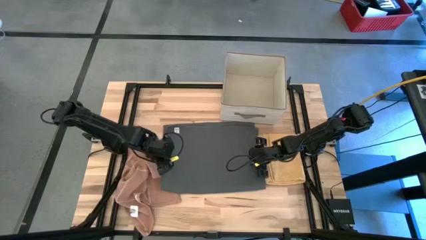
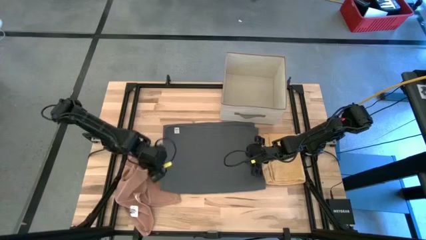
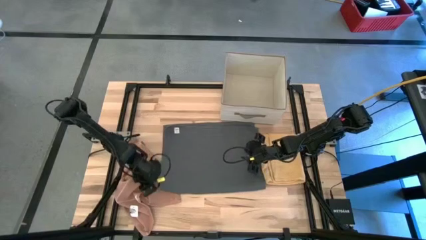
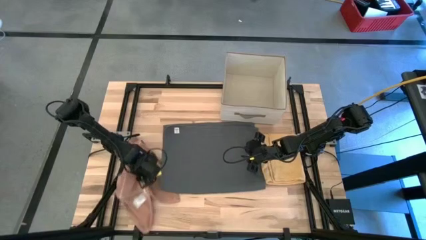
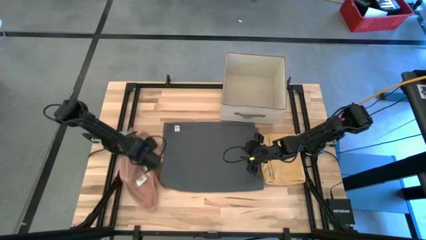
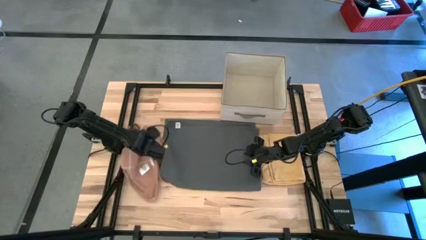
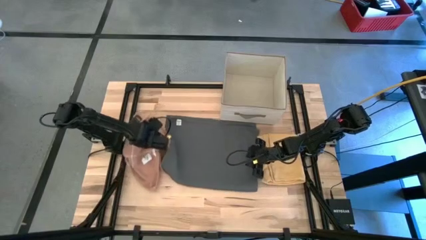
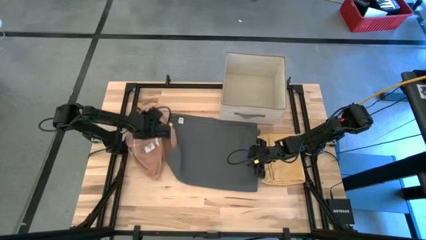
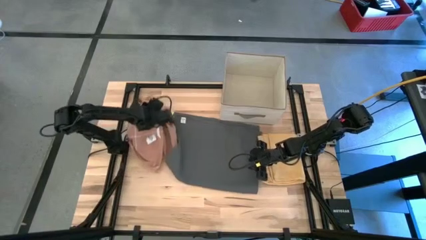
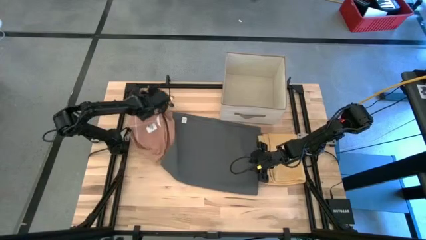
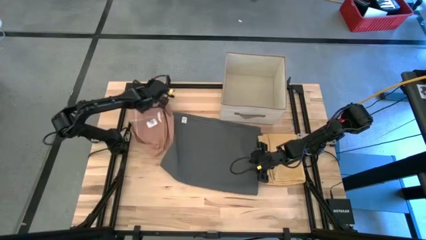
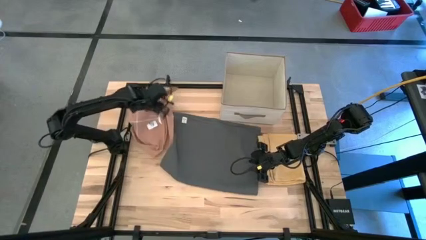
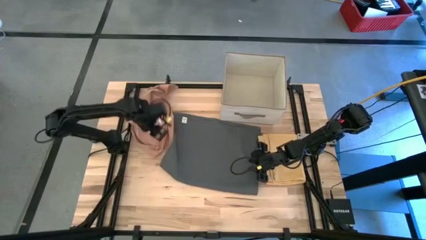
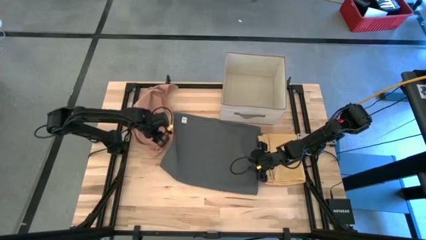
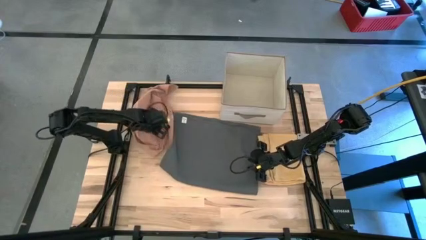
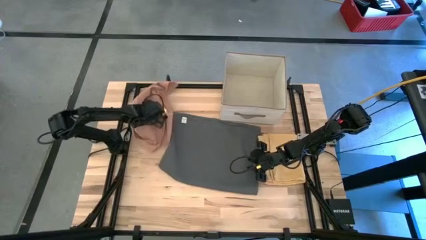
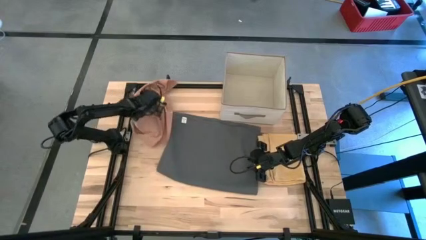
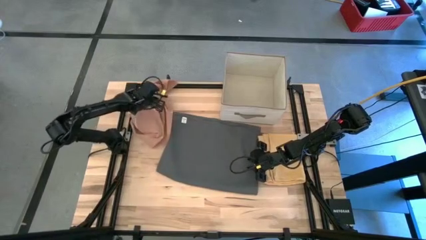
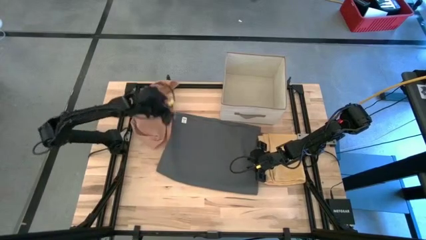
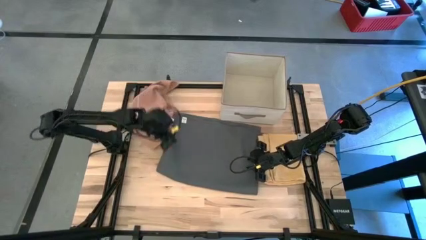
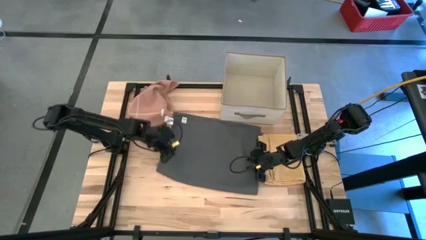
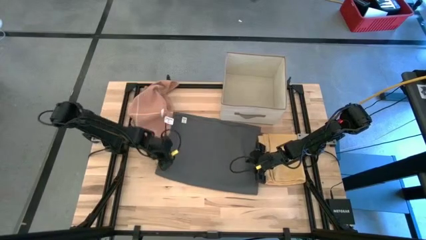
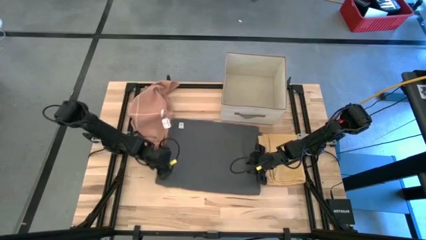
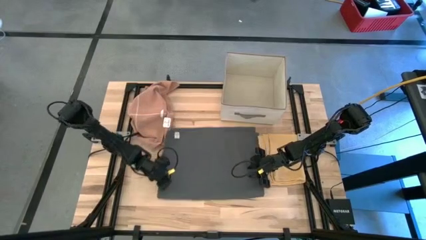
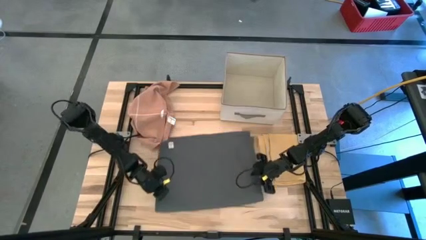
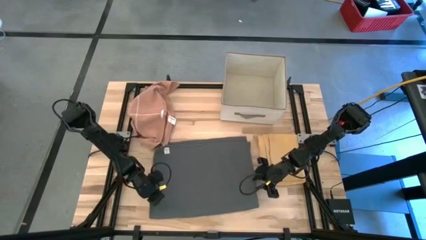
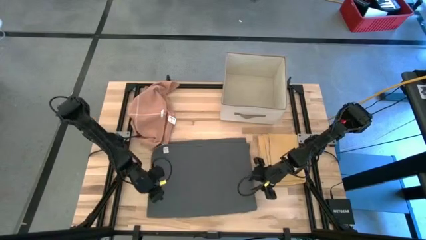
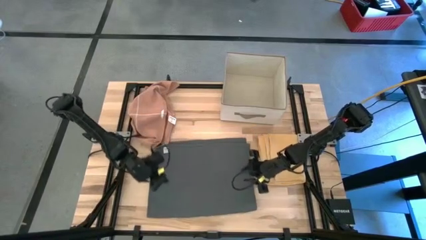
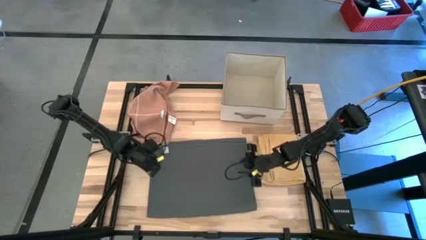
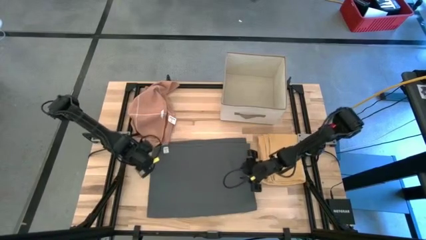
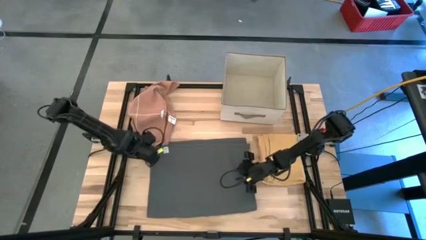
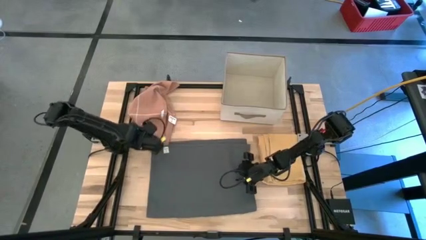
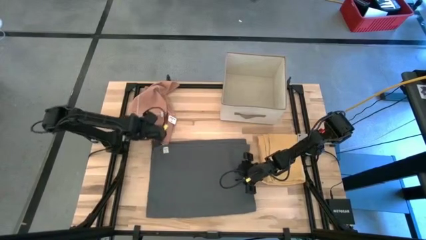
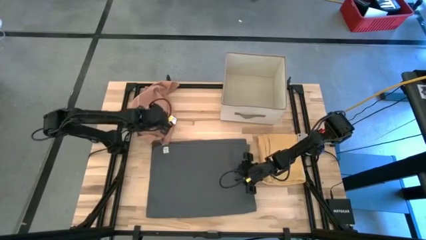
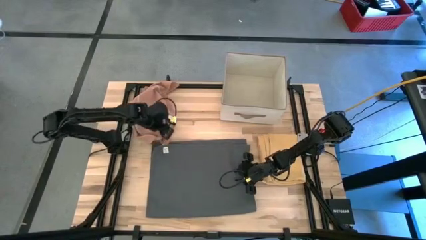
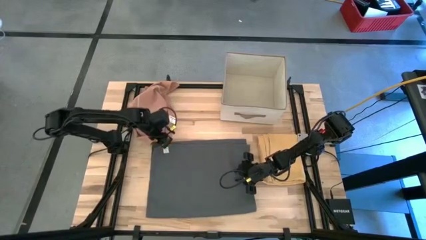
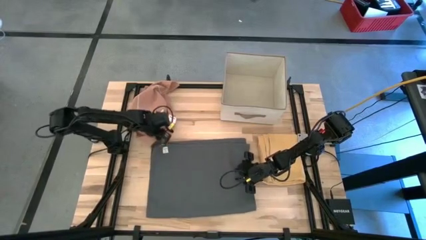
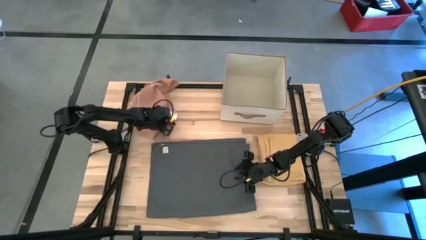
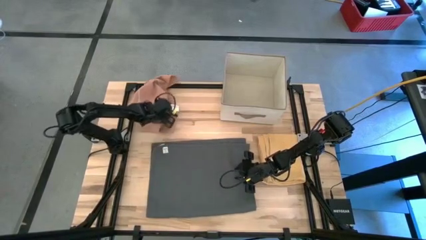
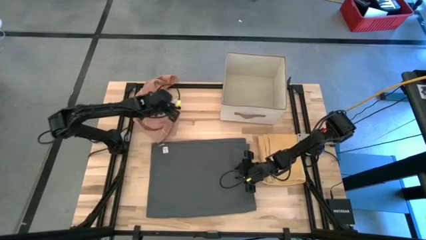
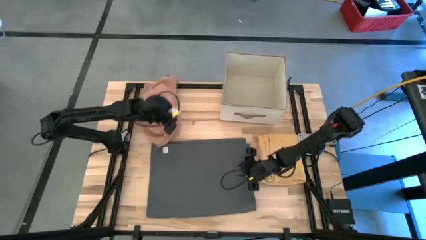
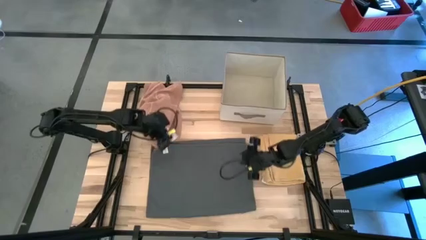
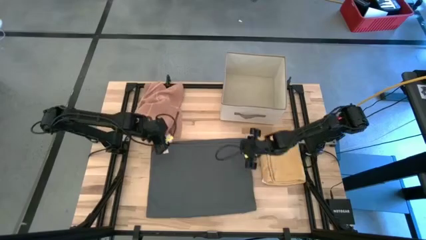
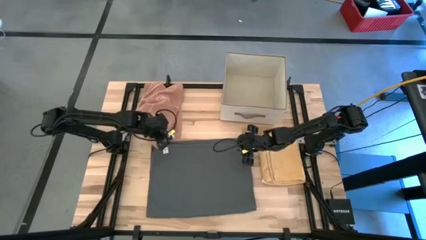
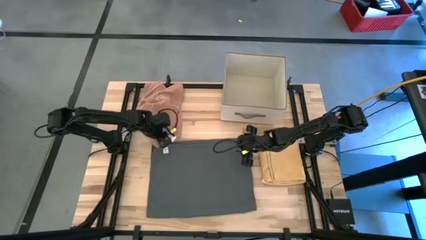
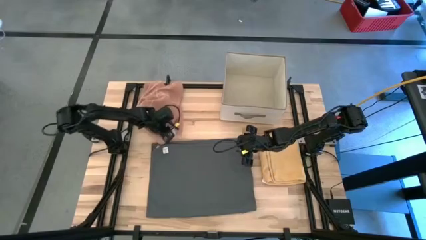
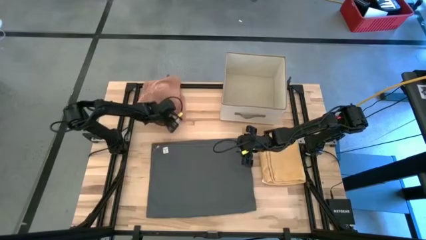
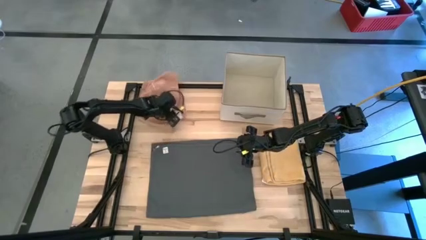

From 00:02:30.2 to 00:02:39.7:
Task: Fold towel
Move the brown towel to the top left of the table

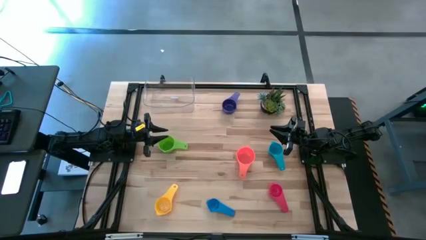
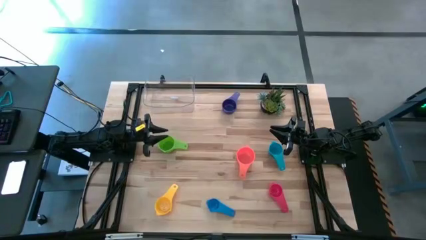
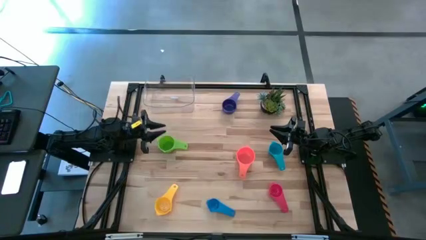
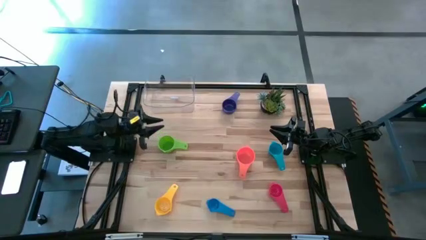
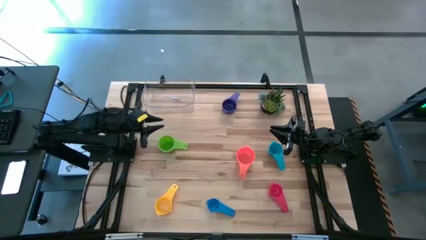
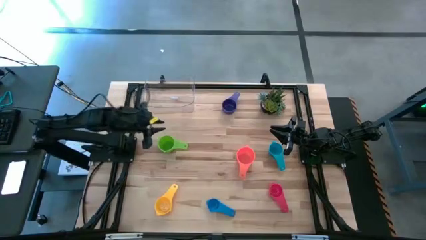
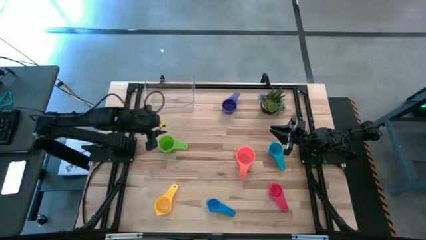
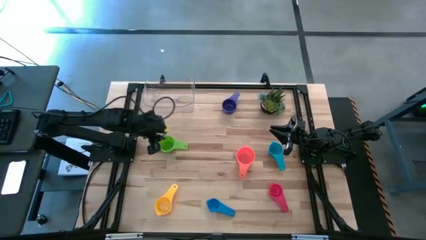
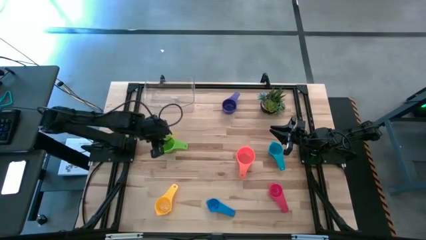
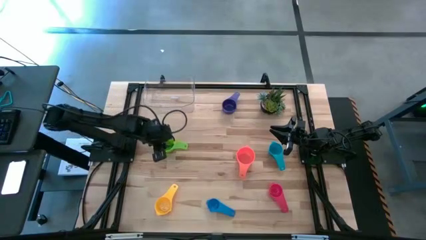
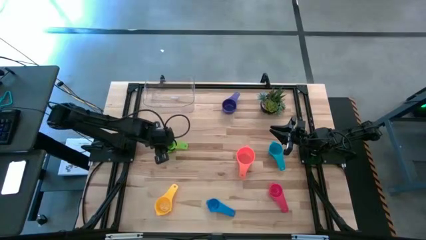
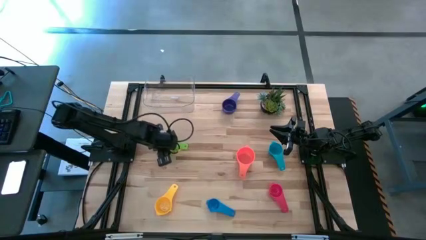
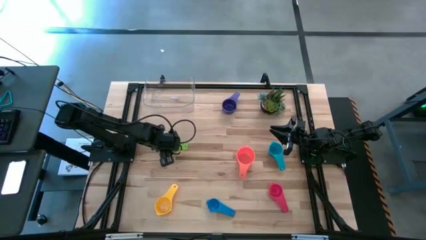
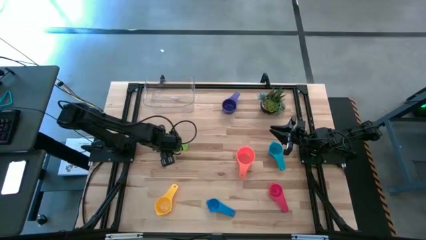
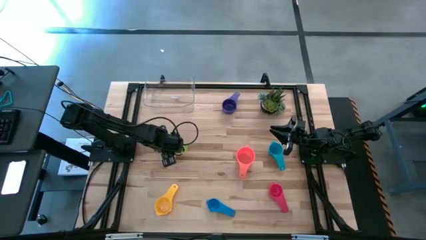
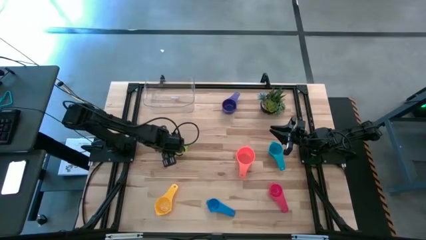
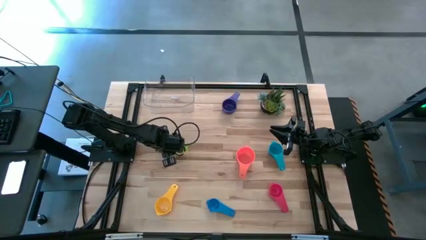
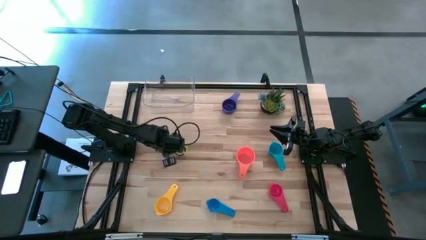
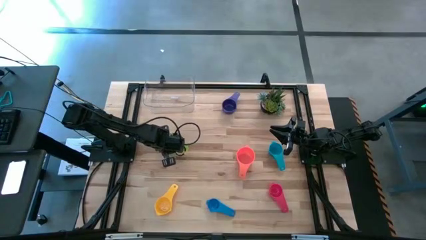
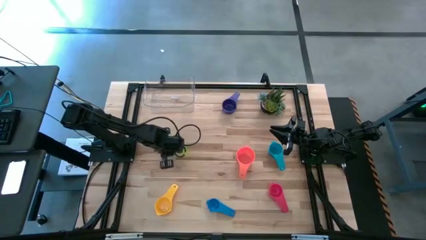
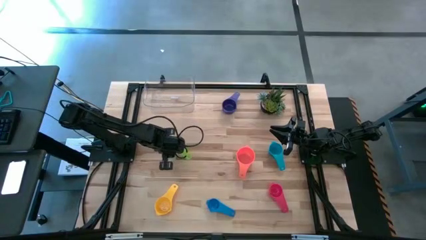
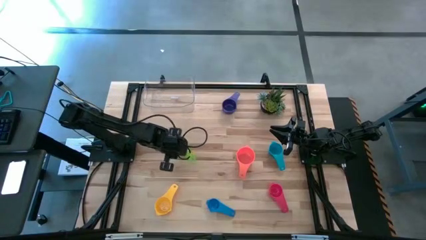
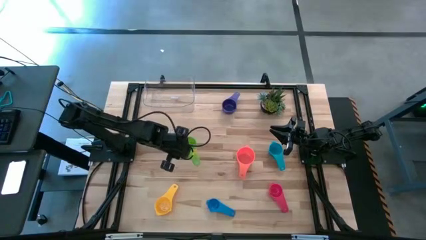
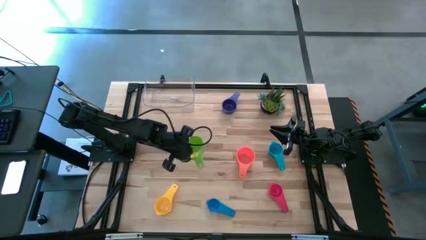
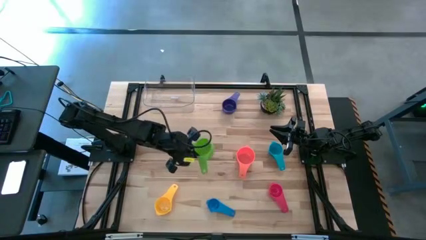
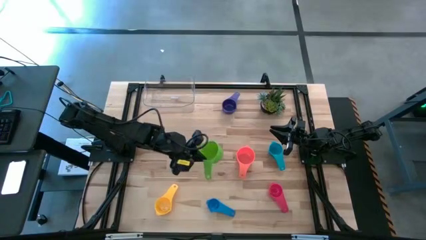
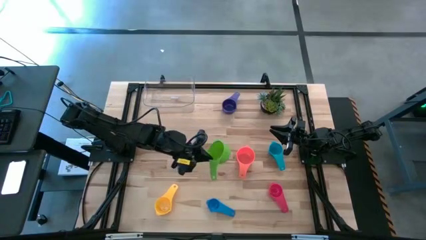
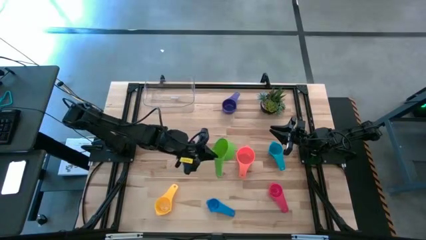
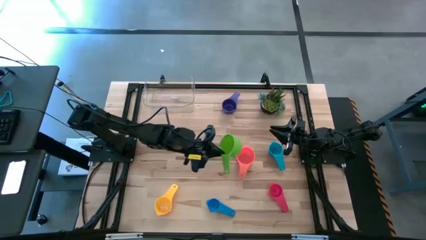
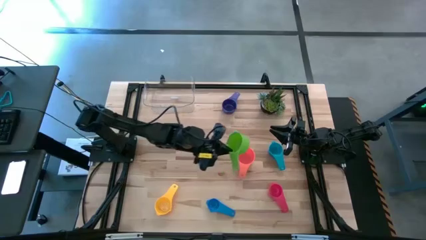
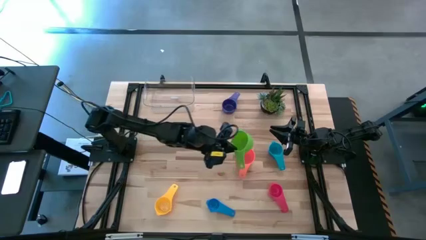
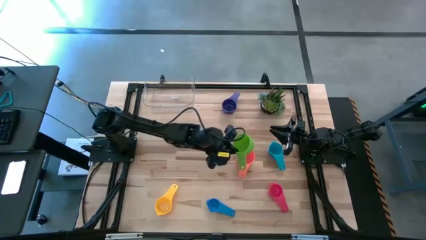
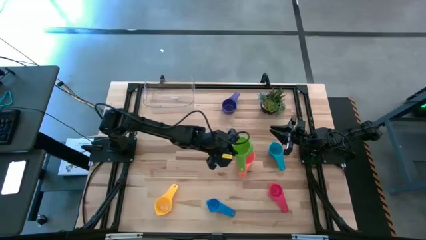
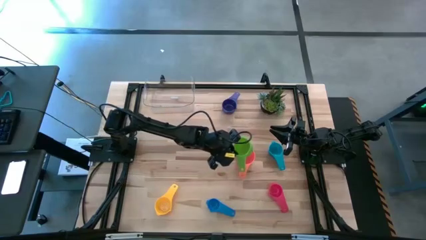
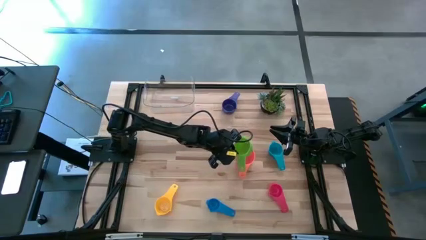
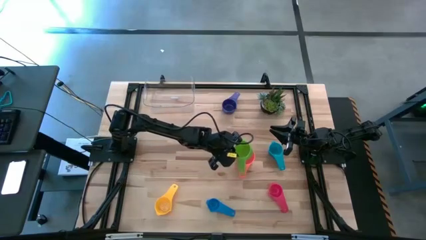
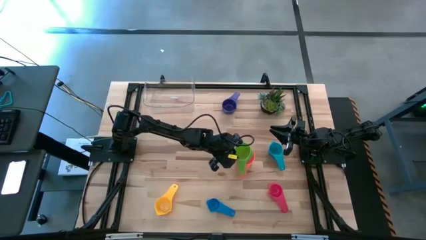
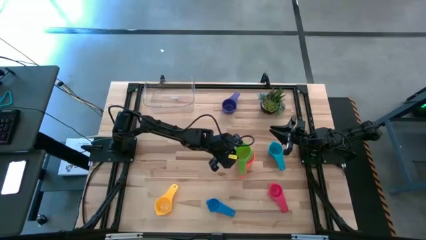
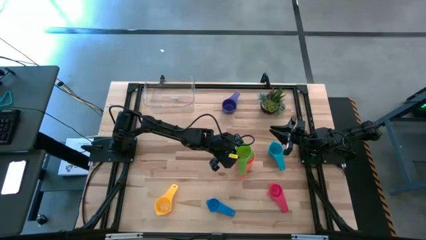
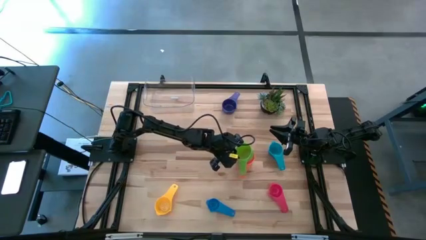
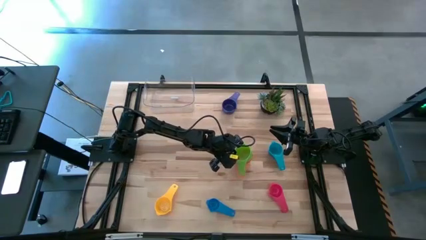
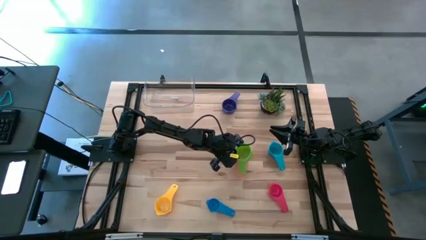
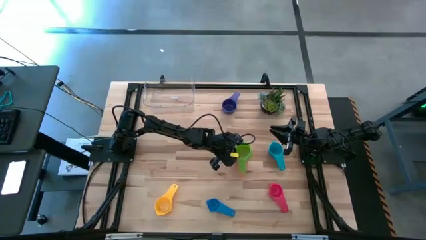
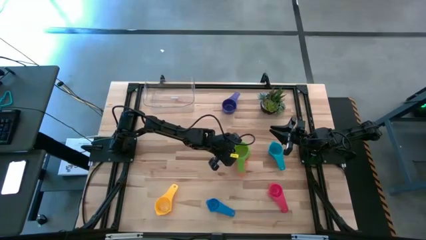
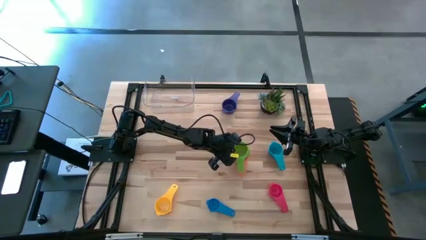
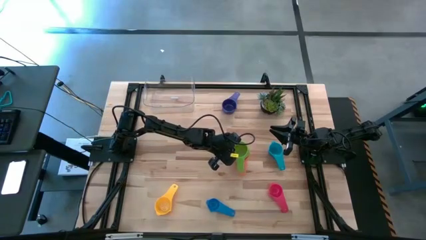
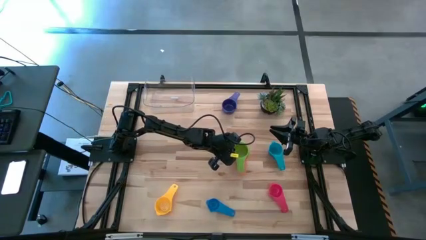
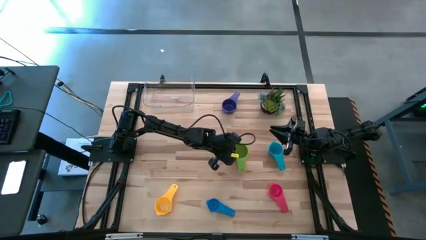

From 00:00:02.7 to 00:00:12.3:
Task: Nest measuring cups in basket
Stack the green measuring cup on top of the orange measuring cup
